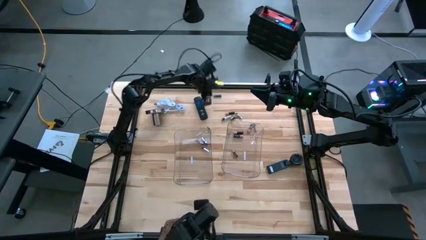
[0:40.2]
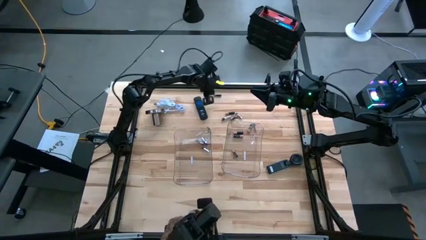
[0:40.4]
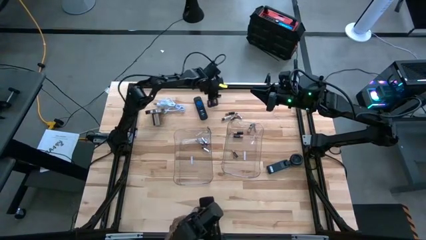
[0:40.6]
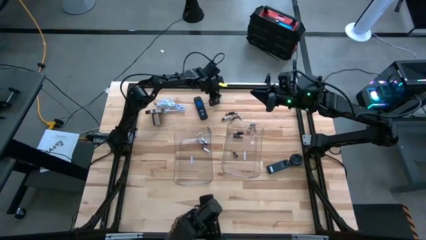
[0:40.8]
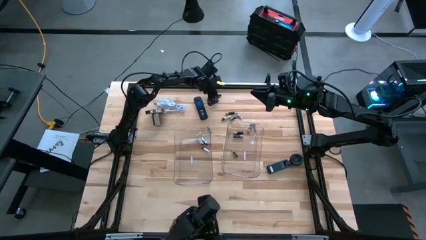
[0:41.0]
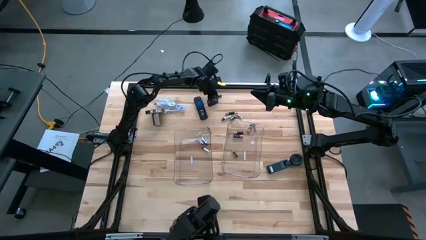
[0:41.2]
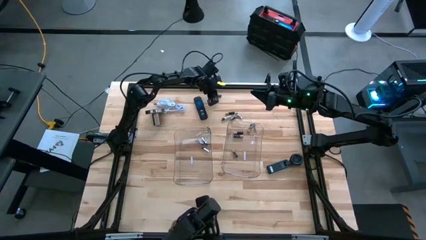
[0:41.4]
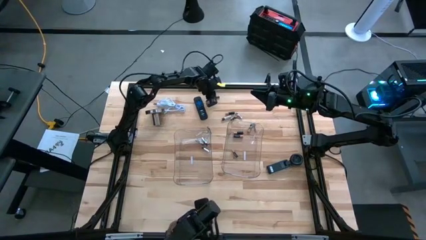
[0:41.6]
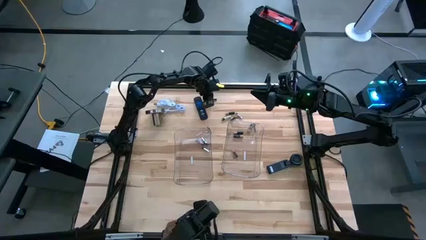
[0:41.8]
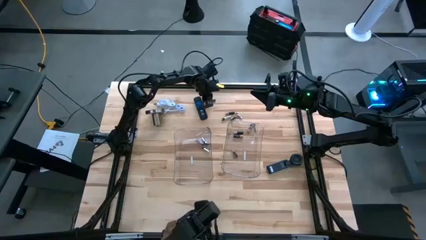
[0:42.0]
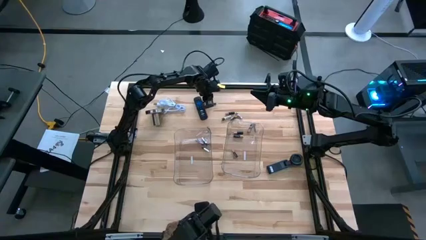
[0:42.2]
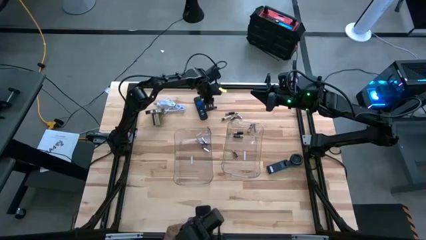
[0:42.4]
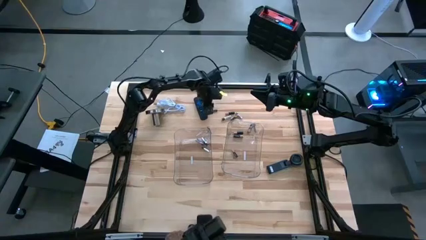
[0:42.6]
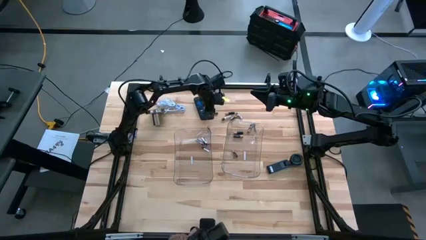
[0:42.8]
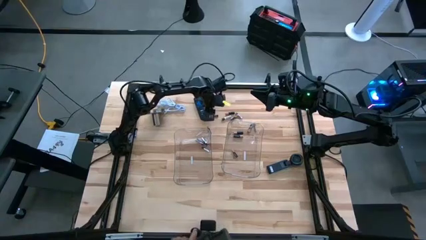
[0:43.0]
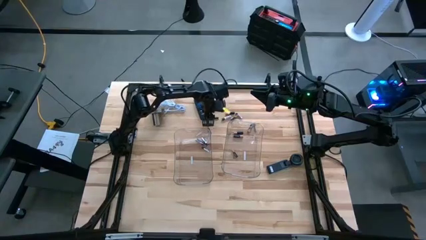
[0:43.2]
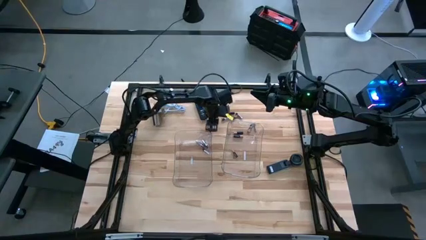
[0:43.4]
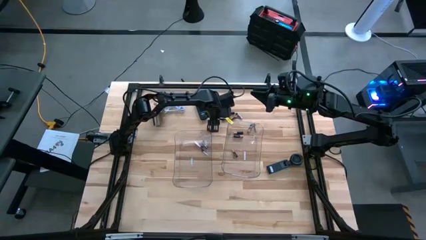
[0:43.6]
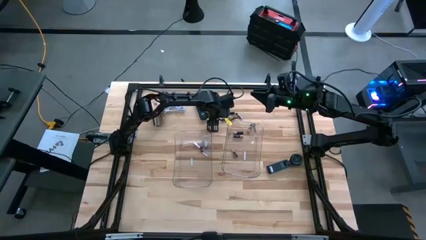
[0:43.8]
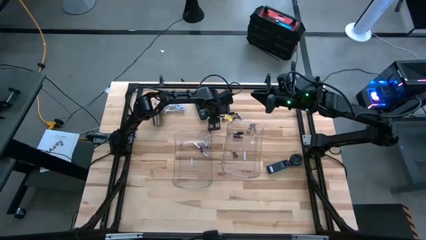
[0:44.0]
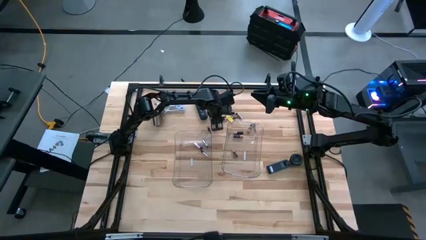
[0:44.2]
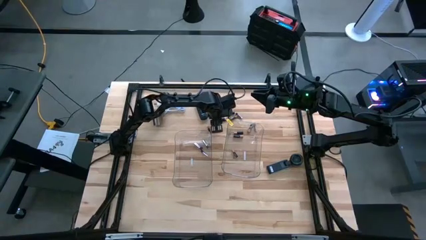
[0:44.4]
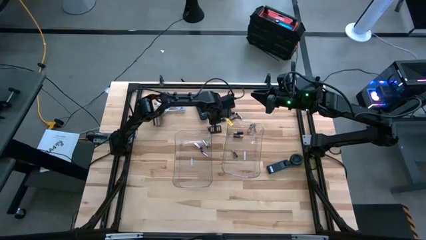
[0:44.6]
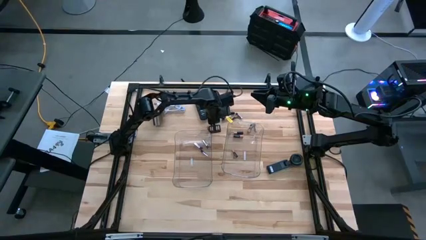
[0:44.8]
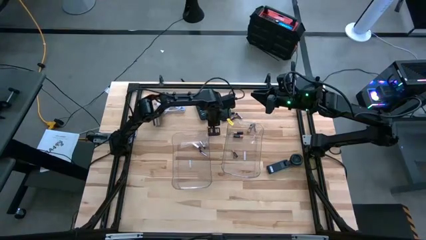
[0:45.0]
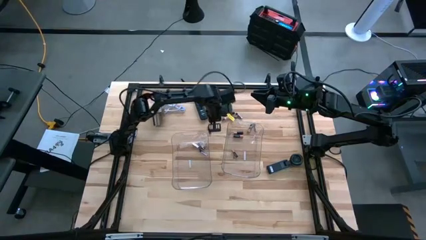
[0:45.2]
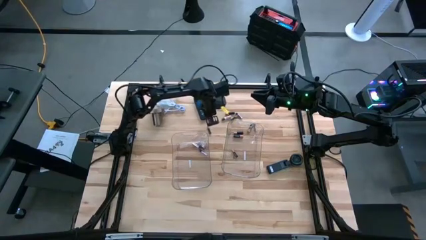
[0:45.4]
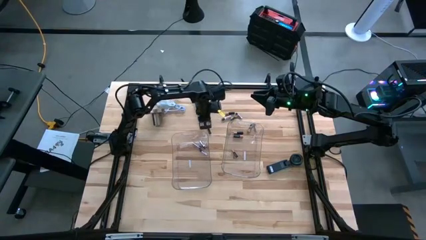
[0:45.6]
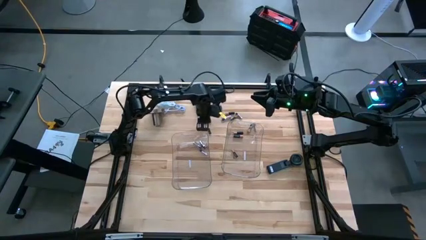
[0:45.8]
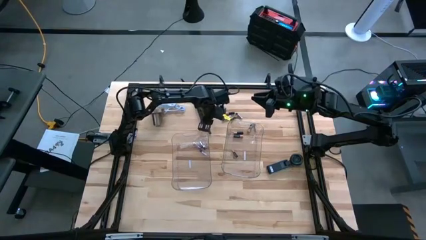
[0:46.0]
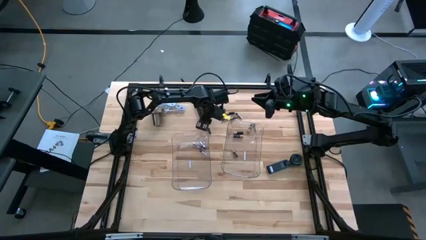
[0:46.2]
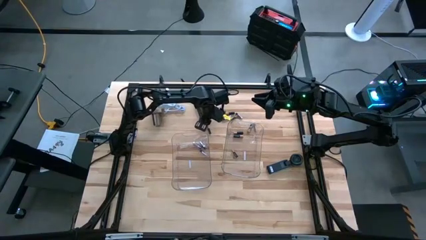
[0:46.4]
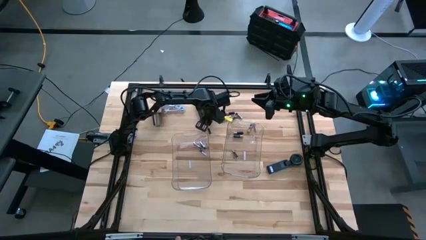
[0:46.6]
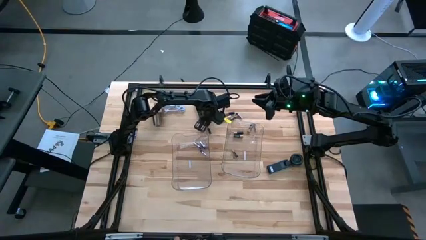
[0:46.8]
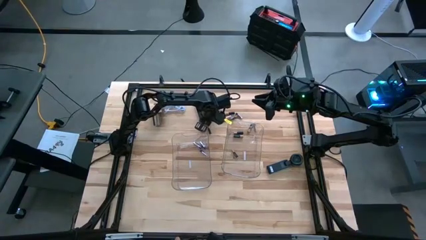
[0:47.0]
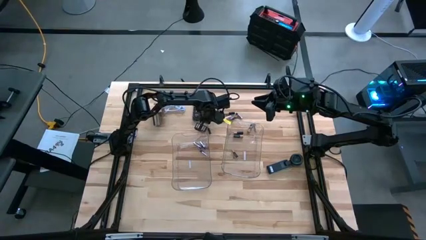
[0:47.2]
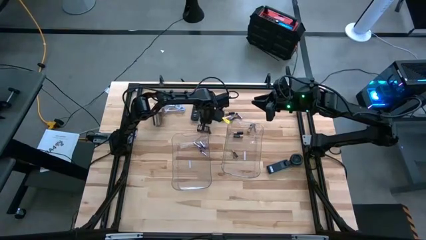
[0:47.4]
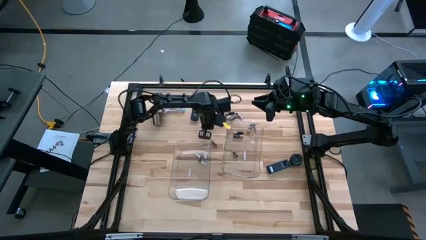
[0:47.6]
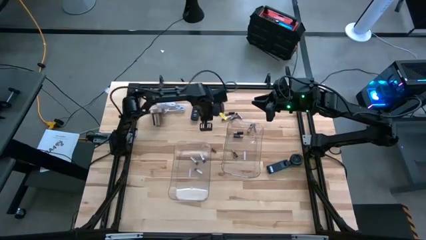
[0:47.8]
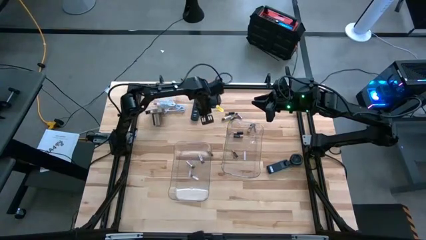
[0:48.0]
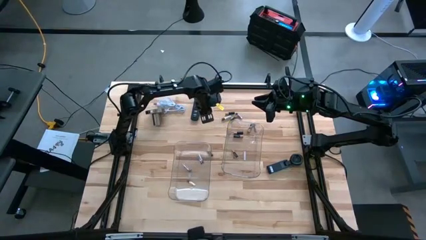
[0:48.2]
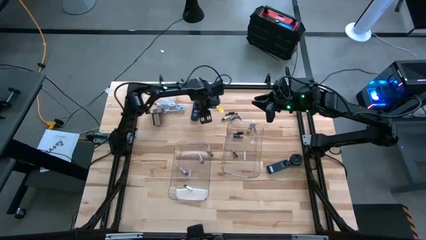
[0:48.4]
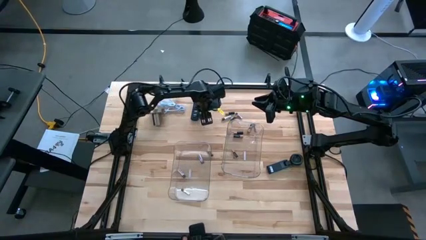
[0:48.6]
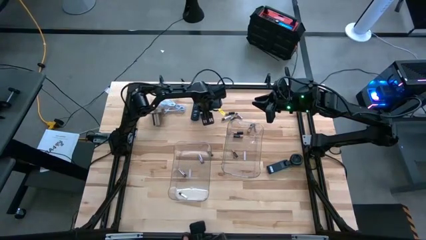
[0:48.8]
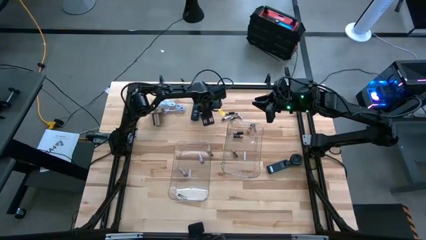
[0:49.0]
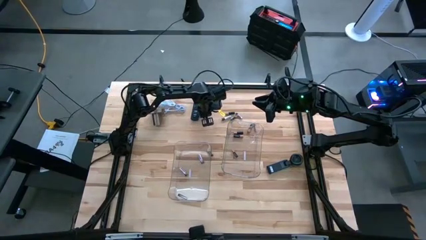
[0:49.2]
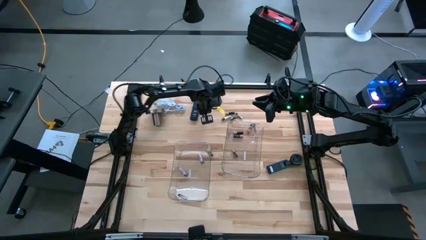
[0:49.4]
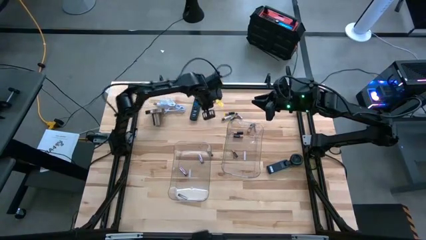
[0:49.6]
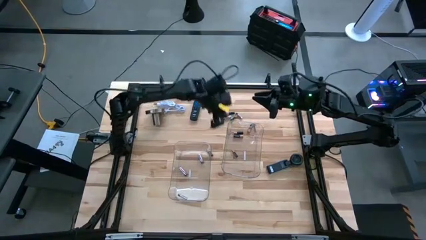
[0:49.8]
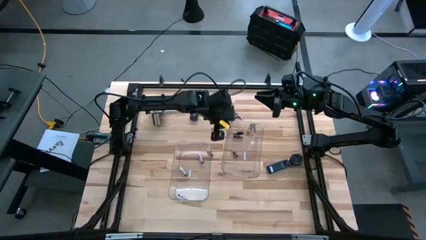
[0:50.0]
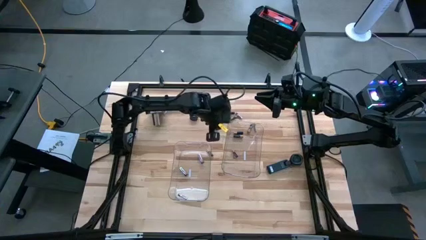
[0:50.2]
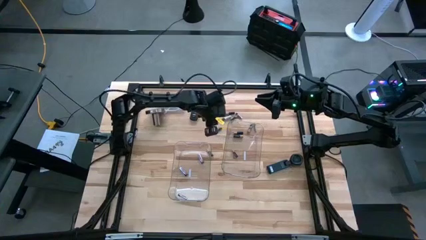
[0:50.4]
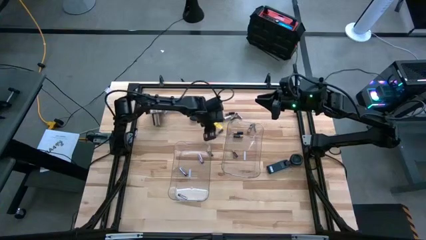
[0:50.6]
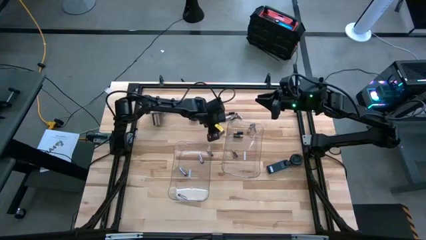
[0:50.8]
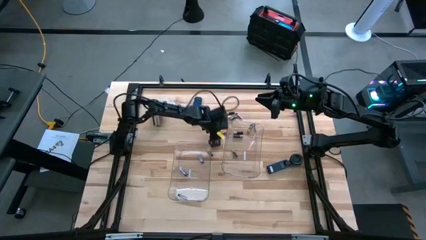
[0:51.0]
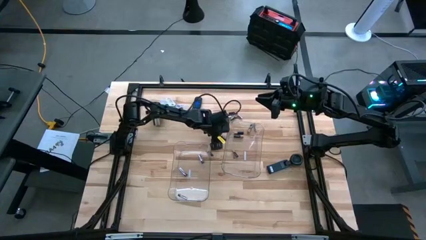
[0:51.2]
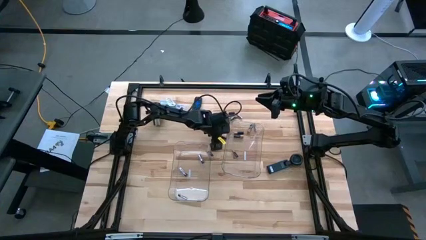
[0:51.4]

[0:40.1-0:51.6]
Task: Sort batteries
Put the black battery into the right transparent bin

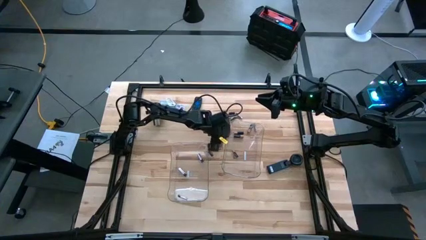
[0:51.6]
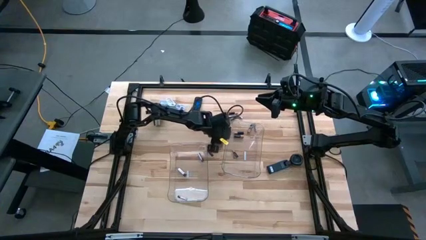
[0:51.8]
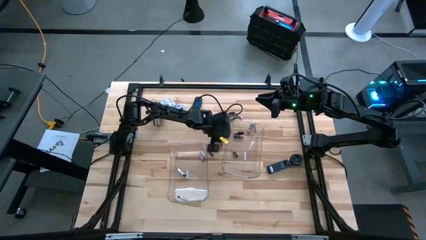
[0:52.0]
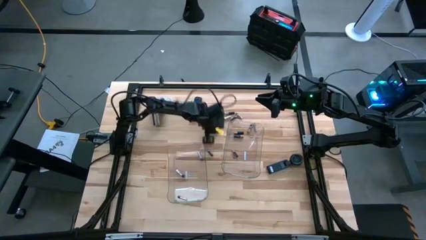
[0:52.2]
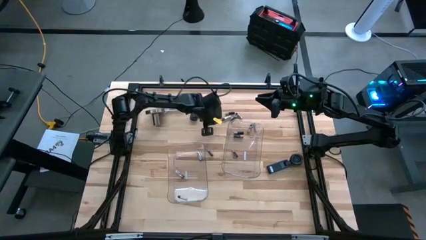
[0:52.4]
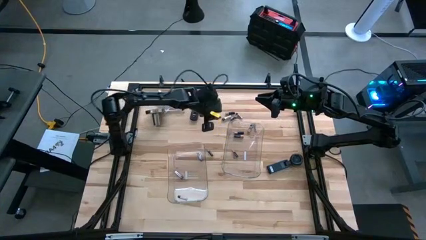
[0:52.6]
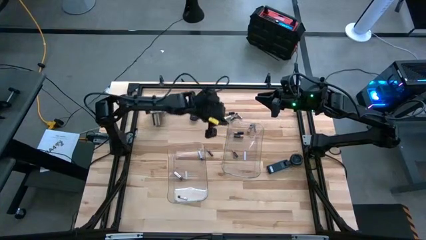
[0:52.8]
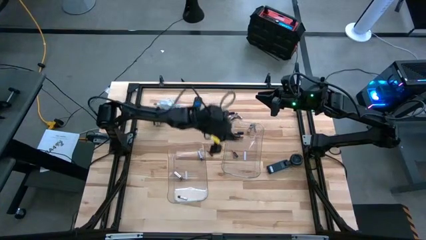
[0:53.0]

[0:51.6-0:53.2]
Put the black battery into the right transparent bin

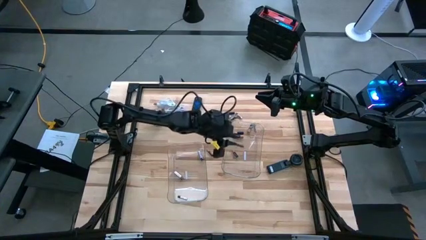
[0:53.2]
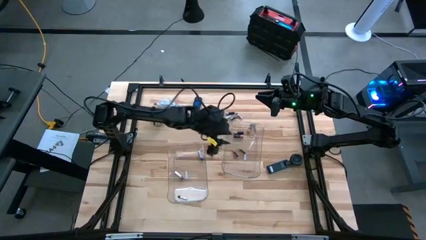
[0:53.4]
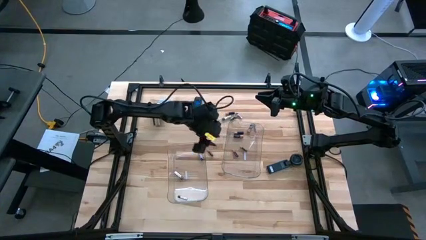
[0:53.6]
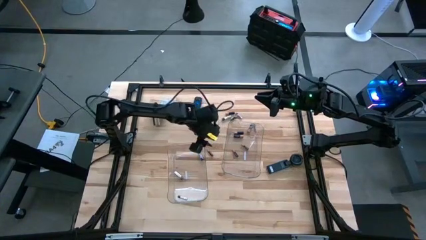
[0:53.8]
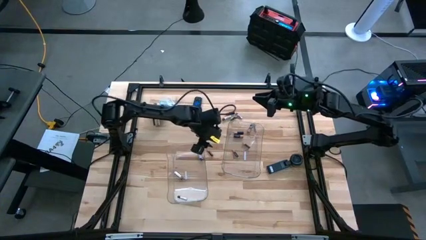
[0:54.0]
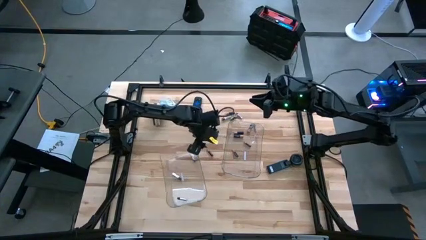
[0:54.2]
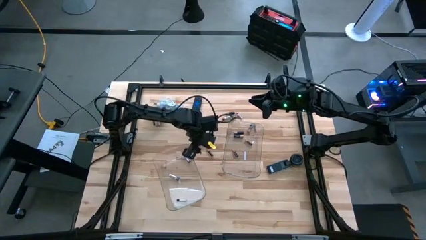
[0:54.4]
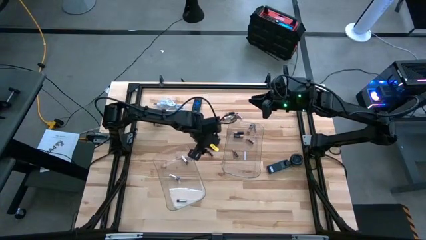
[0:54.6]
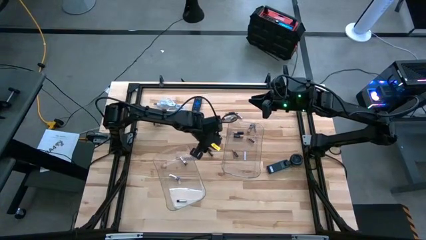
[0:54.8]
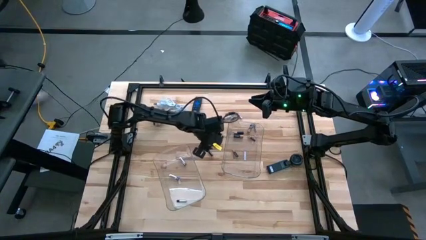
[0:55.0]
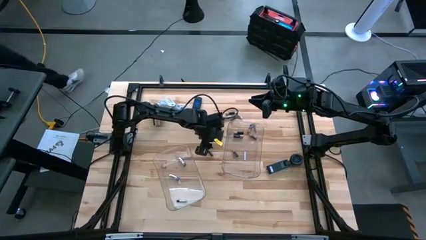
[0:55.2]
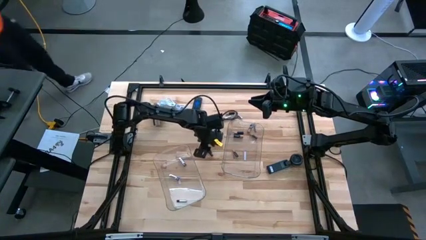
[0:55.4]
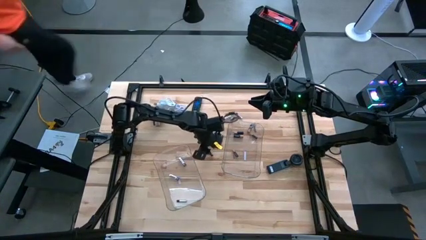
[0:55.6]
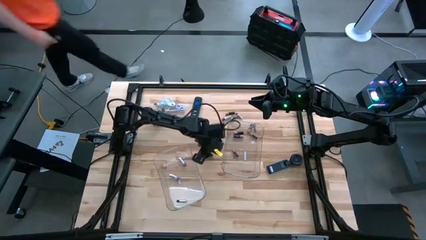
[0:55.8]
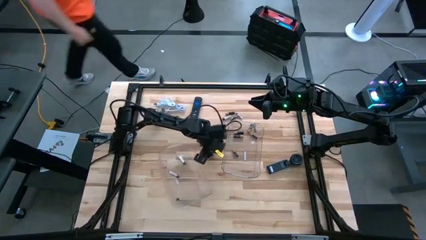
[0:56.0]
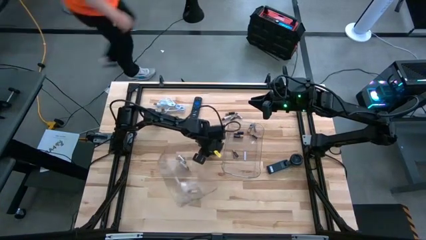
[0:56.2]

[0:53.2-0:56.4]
Put the black battery into the right transparent bin

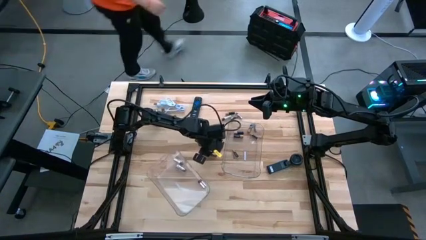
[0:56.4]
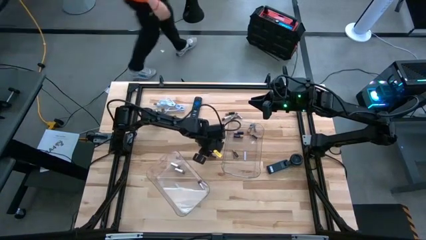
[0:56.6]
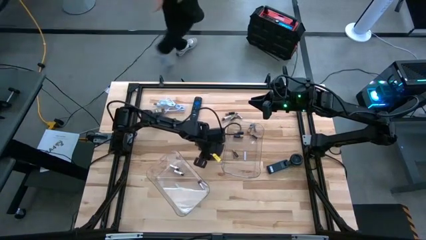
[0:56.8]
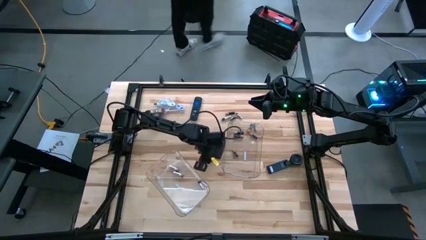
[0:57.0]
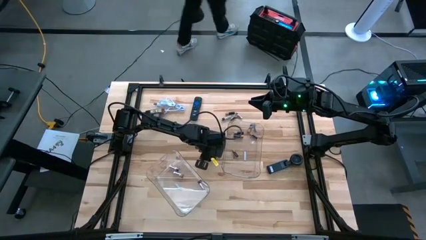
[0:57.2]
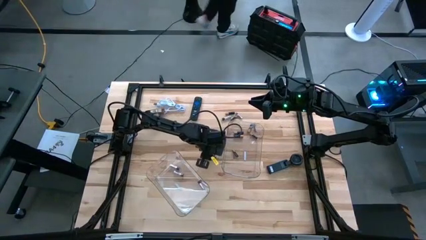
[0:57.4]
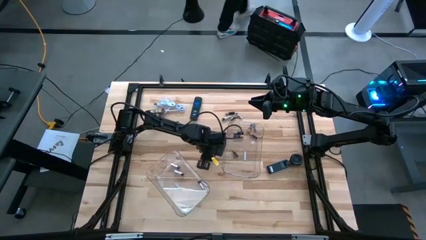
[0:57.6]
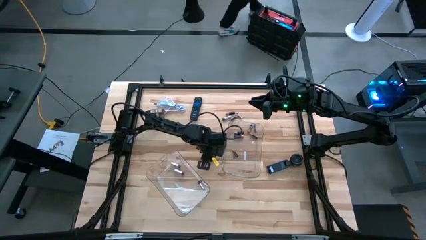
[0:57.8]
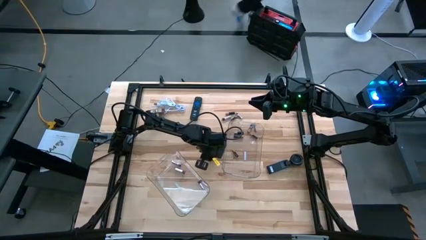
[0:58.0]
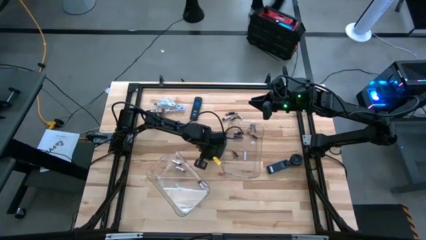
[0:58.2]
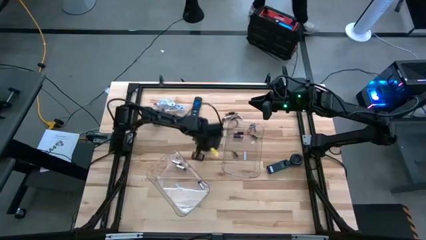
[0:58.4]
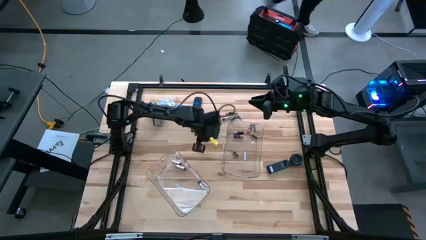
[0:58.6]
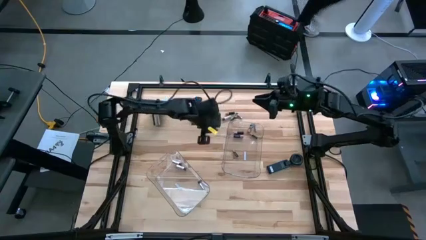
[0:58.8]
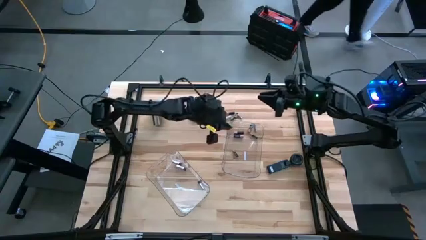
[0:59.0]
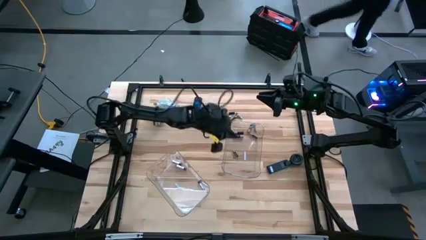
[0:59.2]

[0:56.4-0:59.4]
Put the black battery into the right transparent bin
